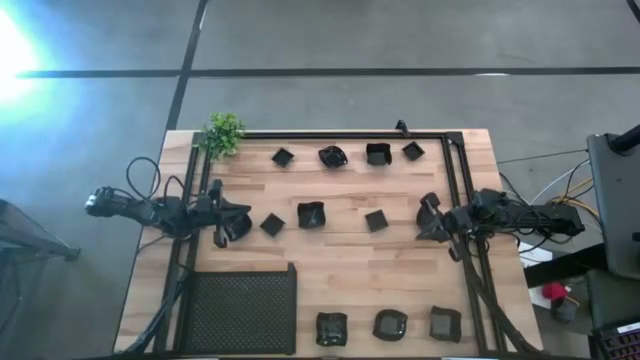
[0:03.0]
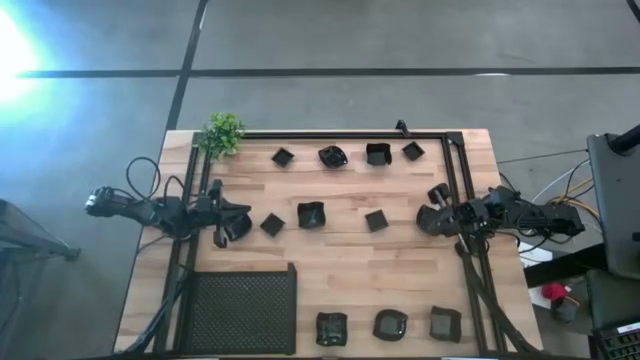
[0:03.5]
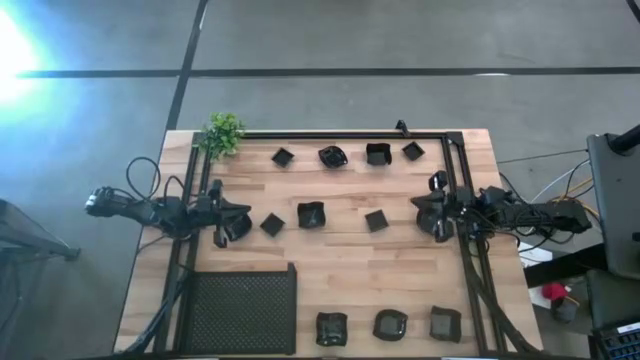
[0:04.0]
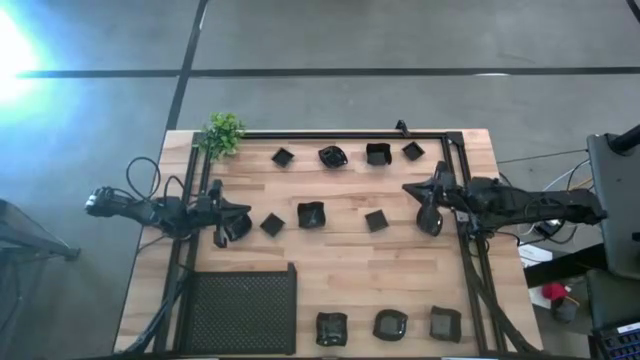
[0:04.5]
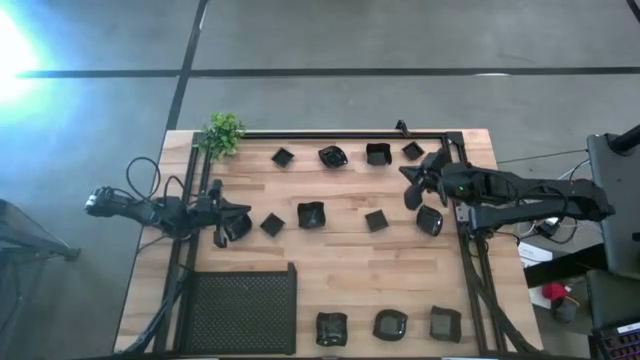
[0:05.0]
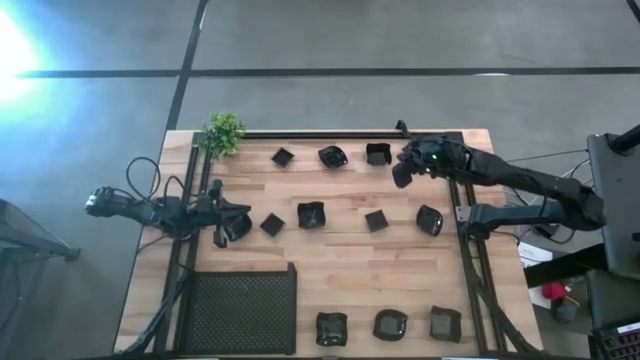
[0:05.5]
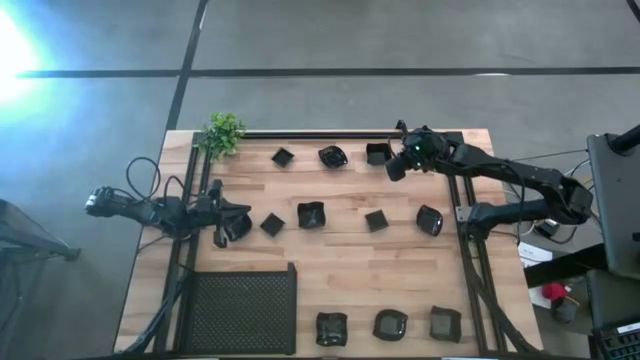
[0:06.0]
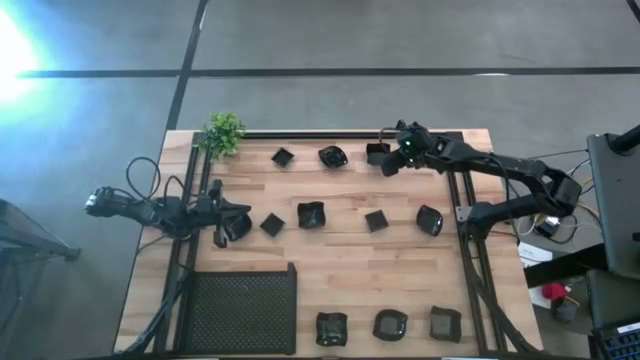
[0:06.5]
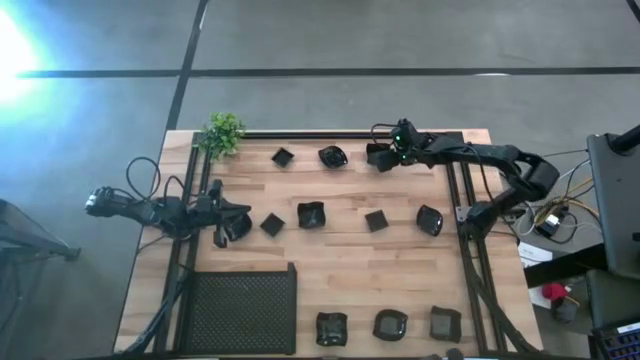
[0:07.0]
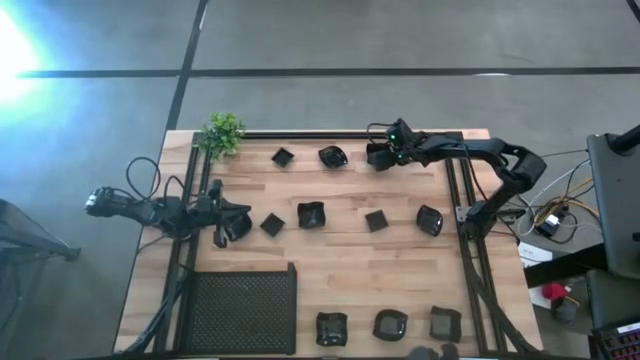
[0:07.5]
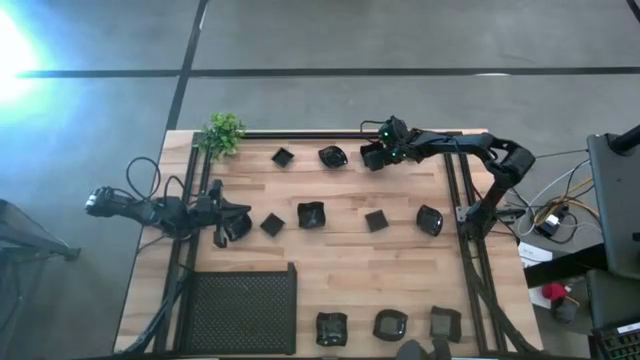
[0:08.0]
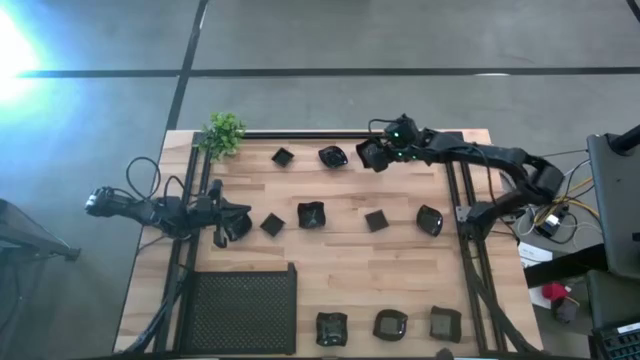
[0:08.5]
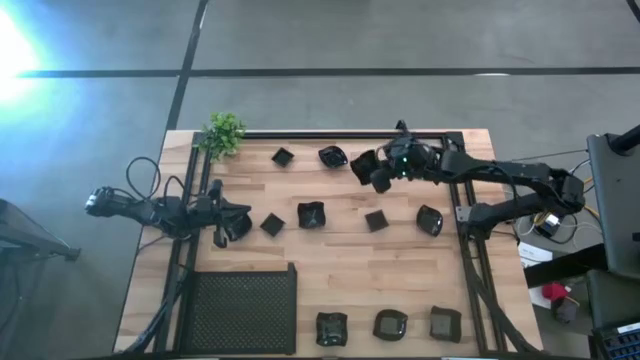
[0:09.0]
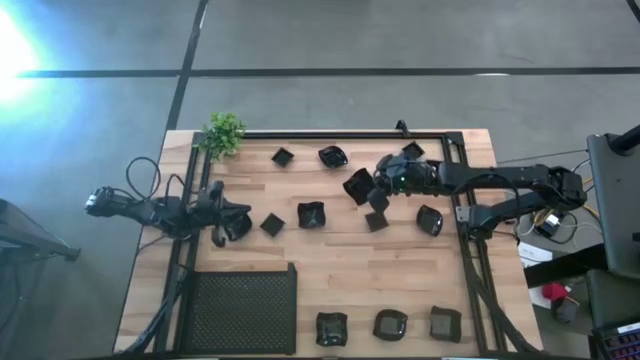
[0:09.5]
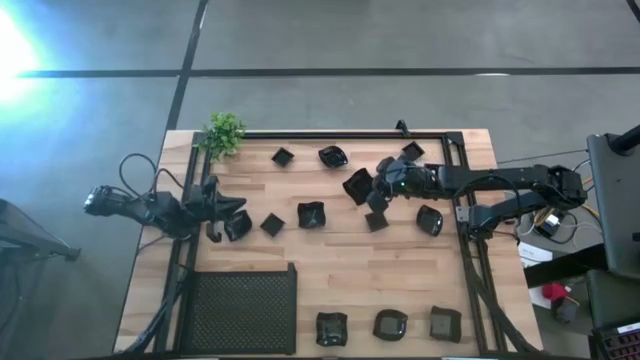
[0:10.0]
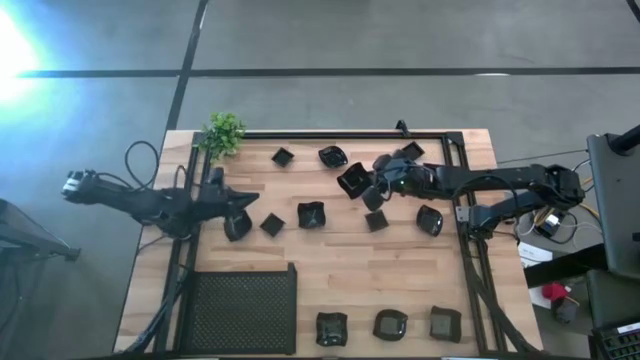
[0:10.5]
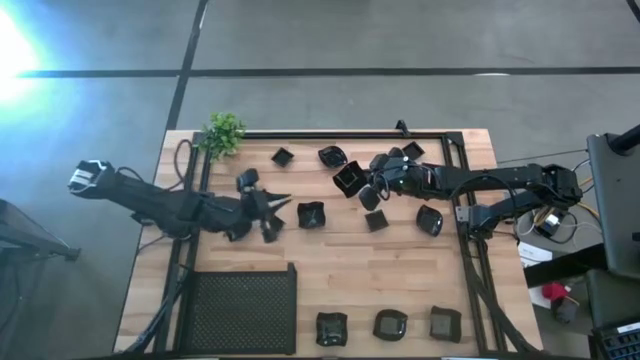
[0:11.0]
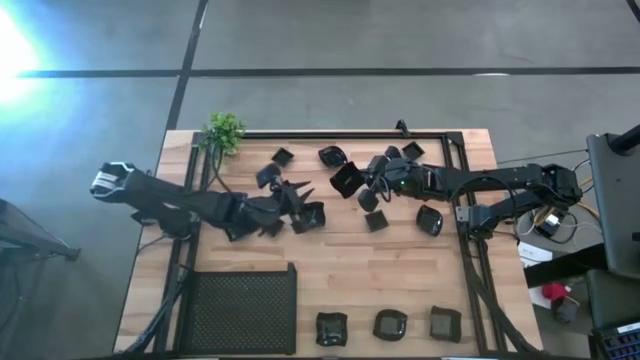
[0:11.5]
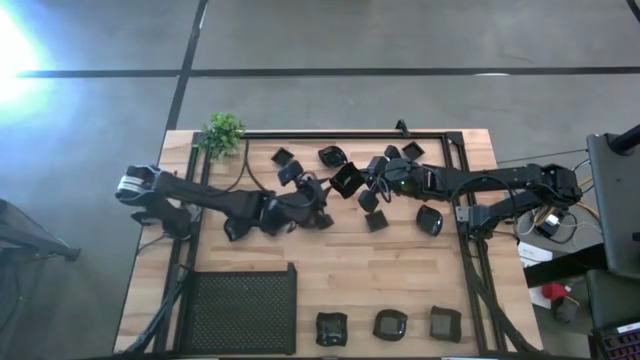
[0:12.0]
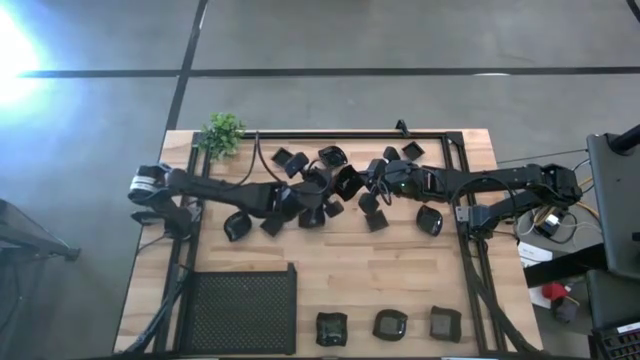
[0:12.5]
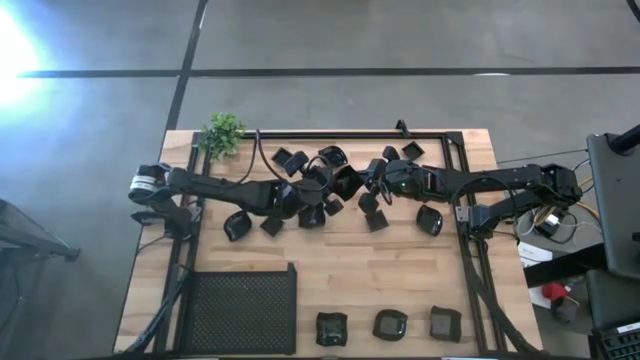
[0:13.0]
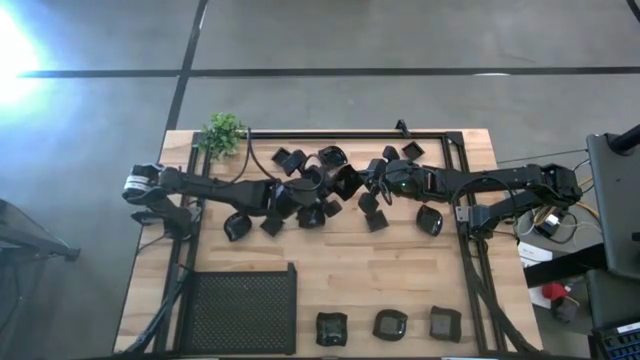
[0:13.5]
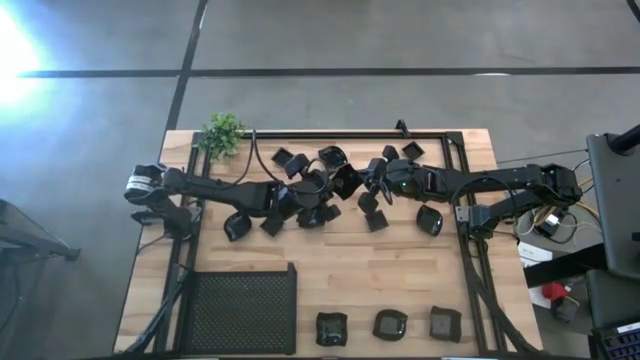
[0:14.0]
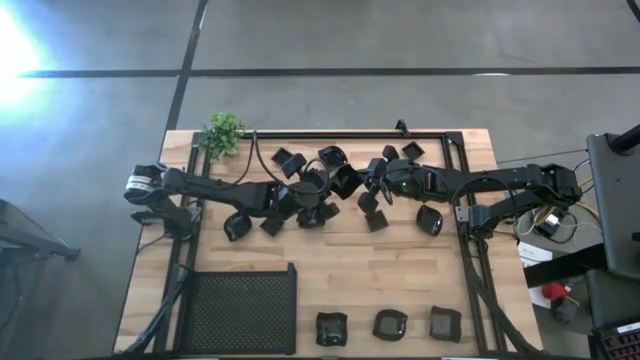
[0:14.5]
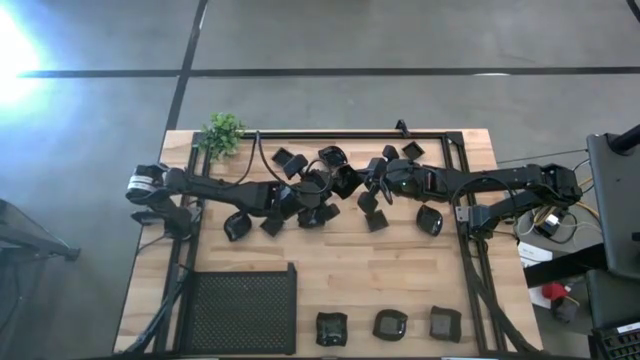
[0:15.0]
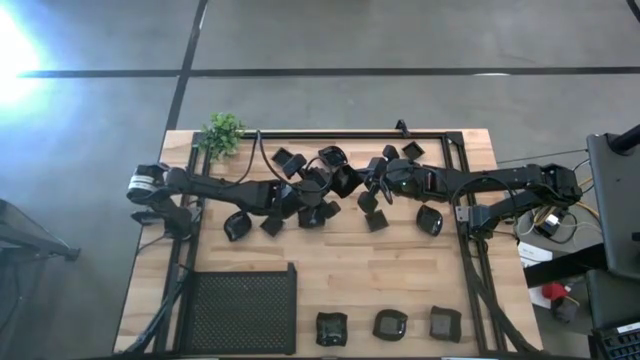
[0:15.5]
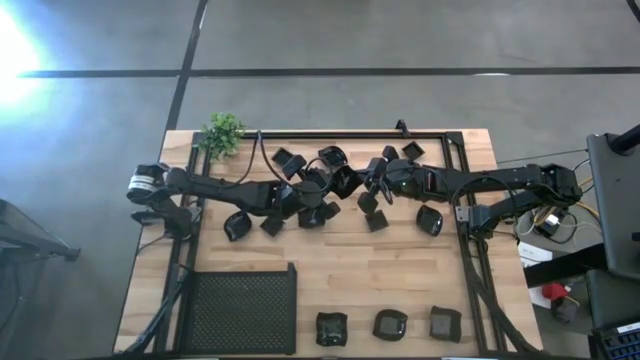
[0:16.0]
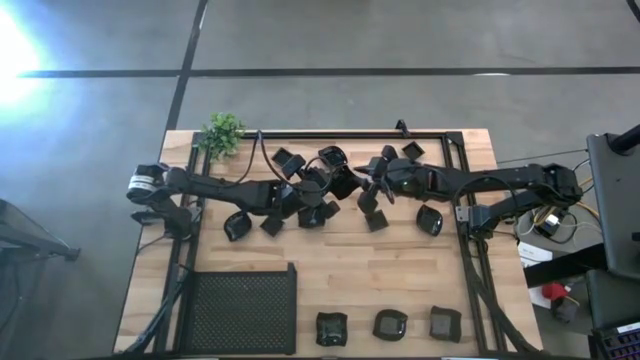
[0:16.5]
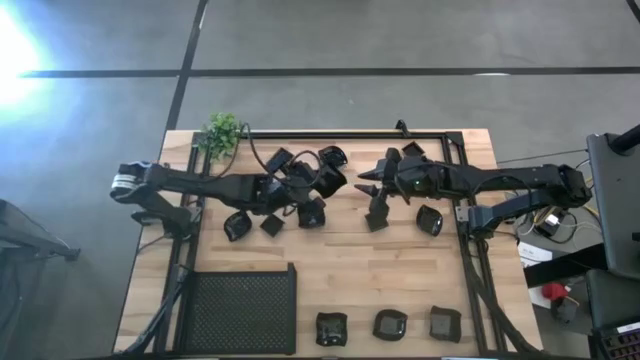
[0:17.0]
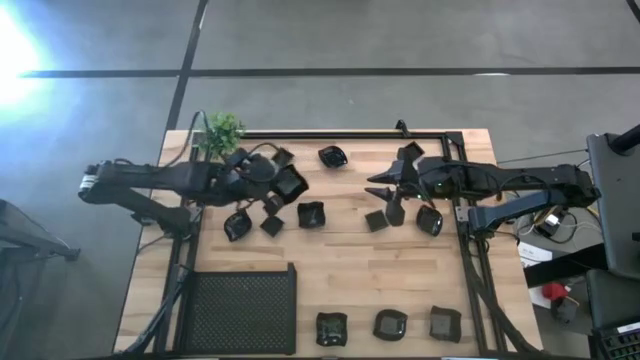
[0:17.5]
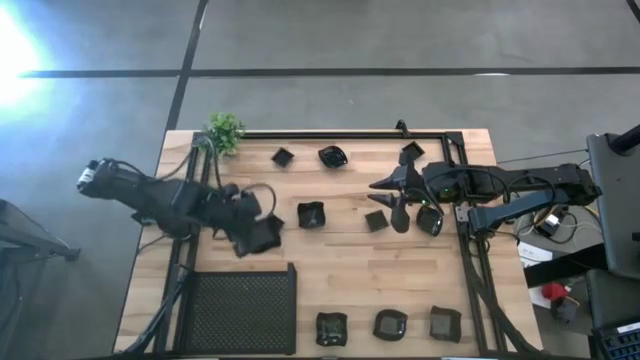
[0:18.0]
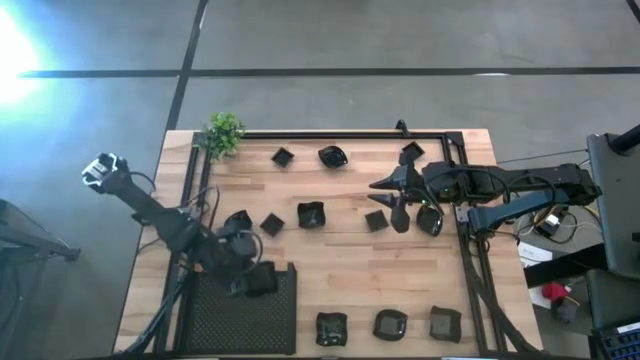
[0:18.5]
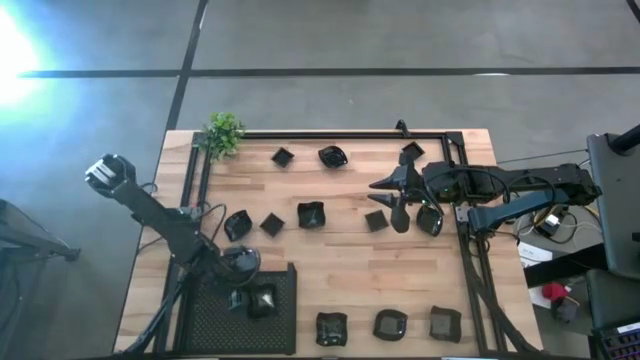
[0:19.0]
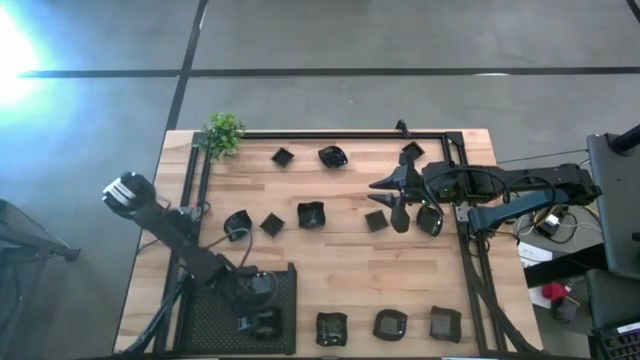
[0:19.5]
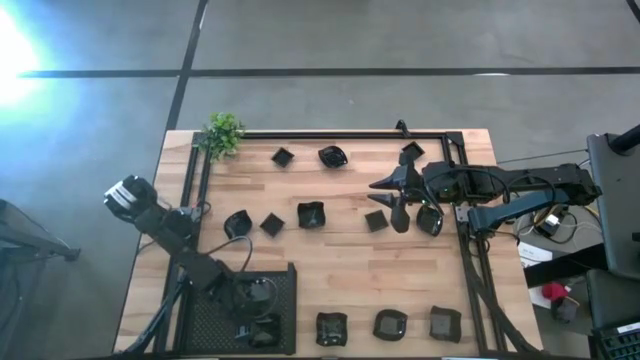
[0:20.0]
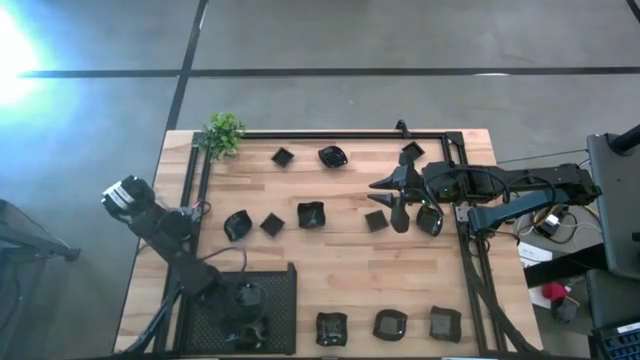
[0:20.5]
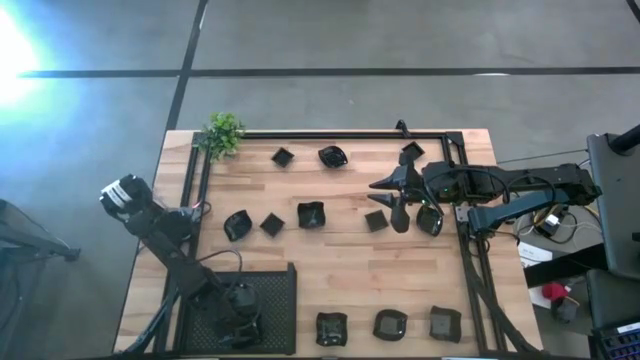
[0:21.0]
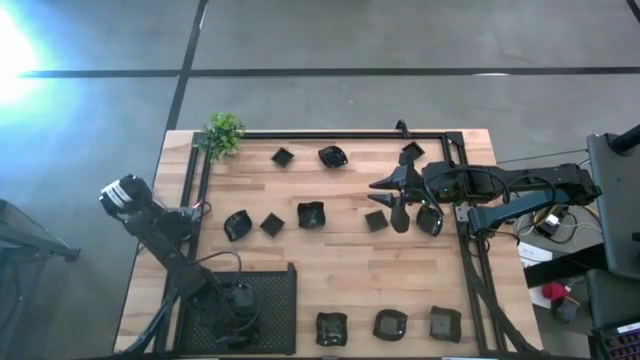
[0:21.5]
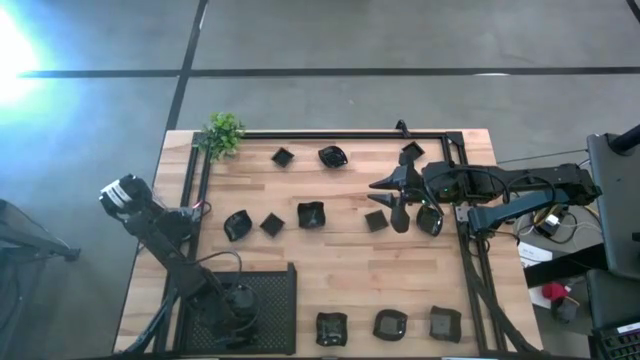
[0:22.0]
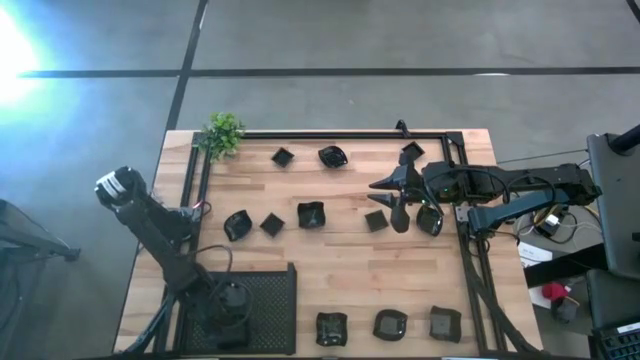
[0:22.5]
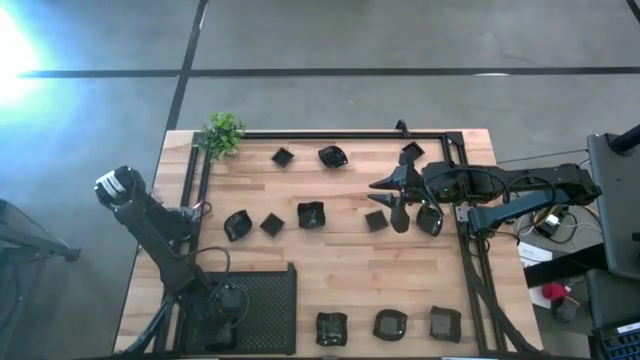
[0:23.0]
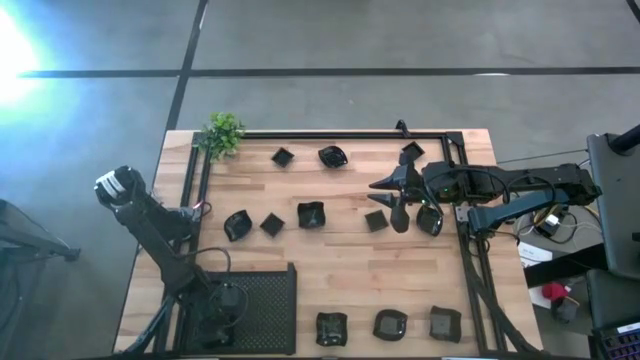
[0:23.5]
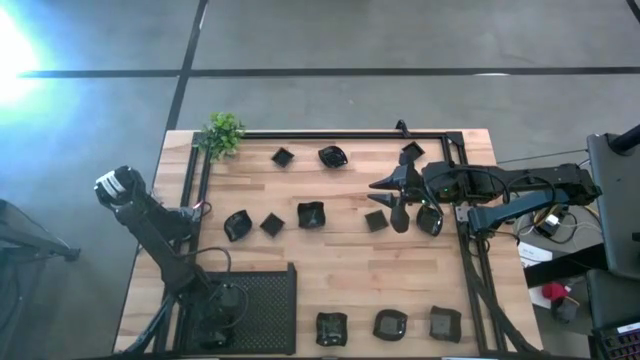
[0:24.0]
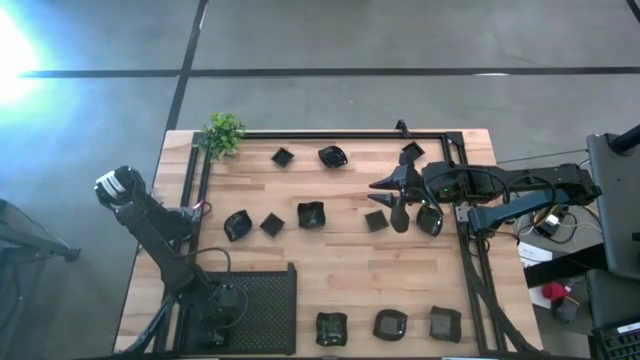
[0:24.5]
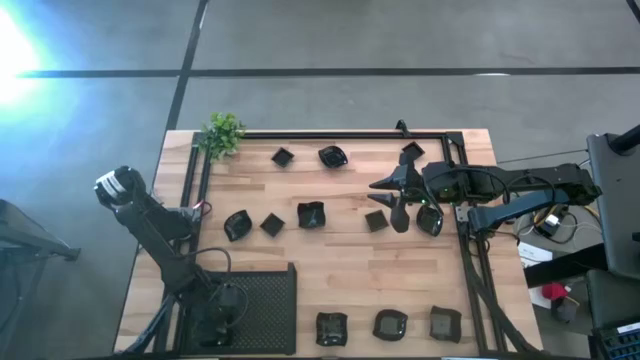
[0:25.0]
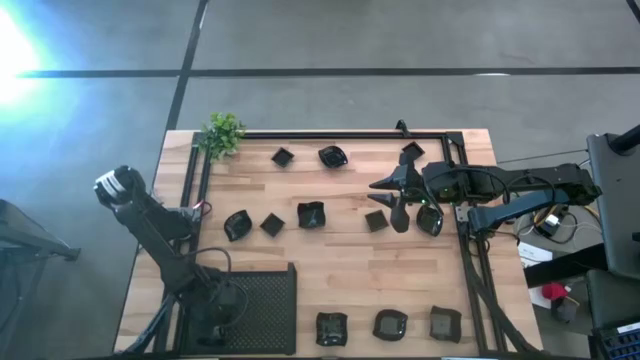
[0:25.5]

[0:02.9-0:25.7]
Task: Pick & Place Mini shaped plates
Put the distorted square plate on the shelf
